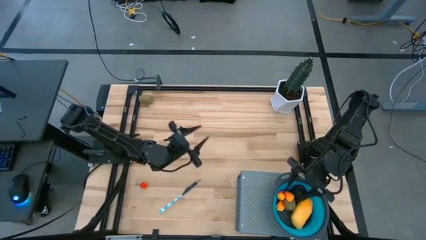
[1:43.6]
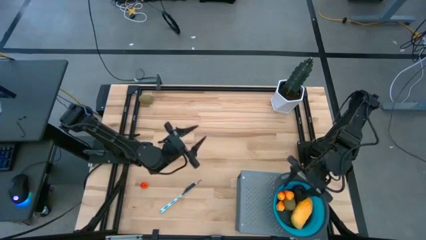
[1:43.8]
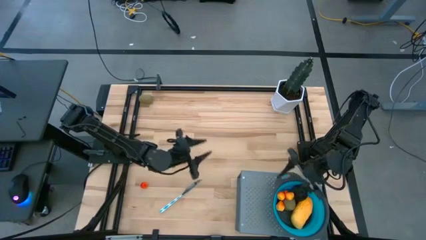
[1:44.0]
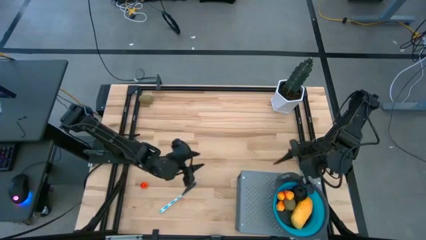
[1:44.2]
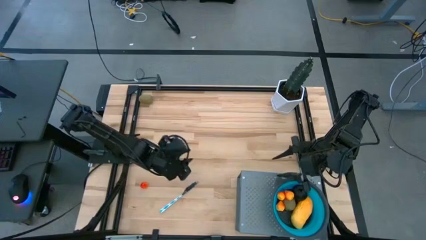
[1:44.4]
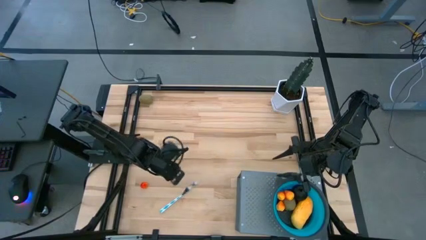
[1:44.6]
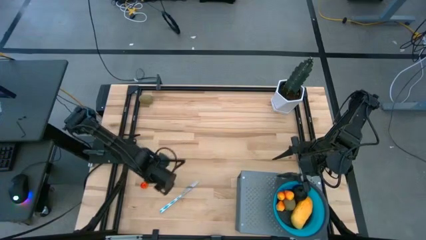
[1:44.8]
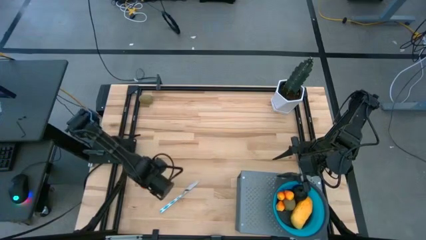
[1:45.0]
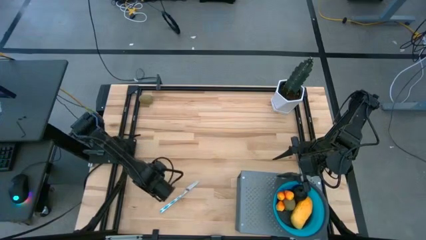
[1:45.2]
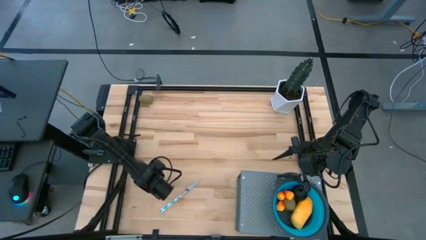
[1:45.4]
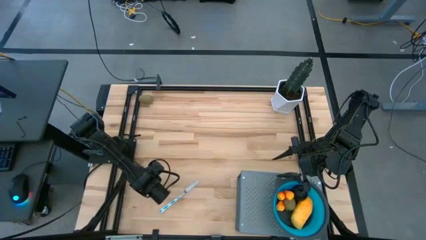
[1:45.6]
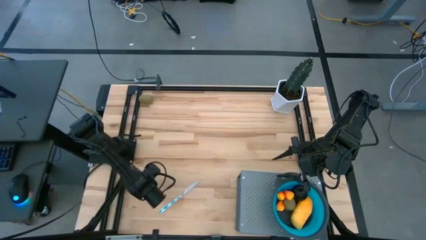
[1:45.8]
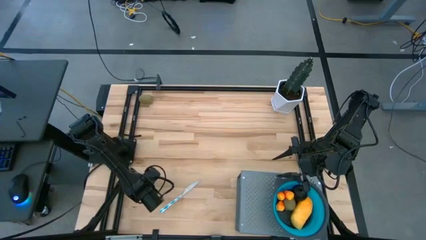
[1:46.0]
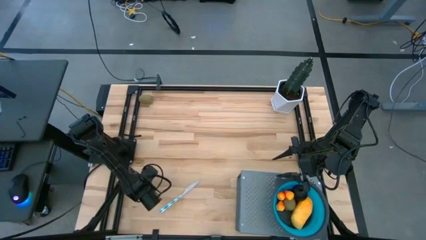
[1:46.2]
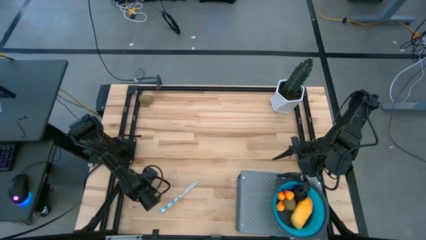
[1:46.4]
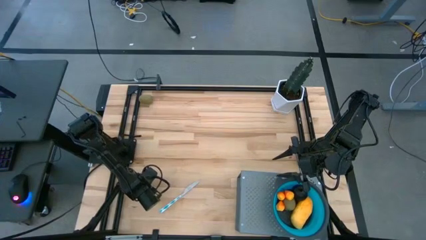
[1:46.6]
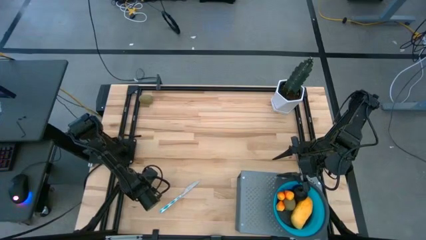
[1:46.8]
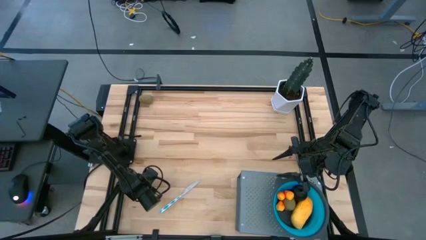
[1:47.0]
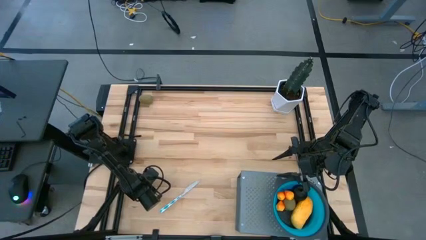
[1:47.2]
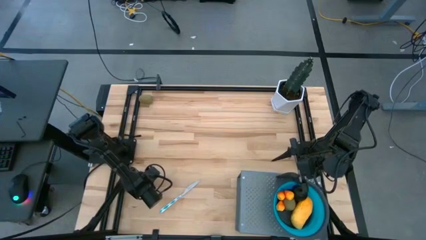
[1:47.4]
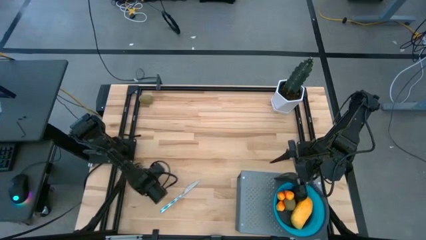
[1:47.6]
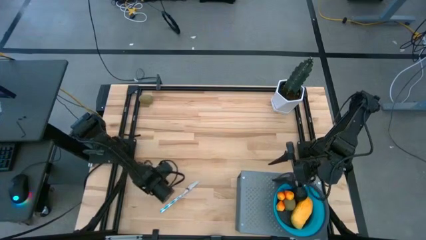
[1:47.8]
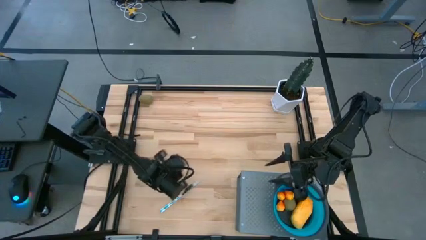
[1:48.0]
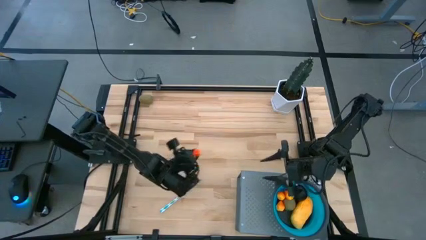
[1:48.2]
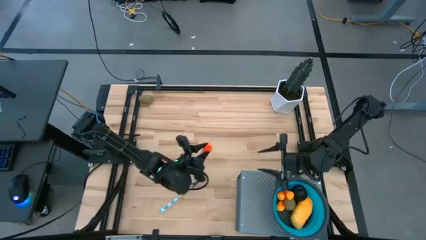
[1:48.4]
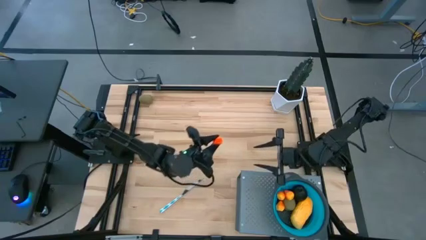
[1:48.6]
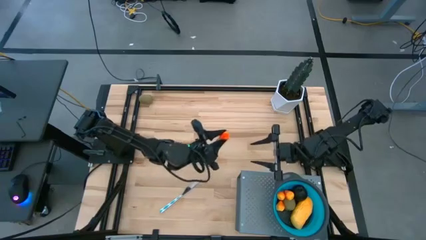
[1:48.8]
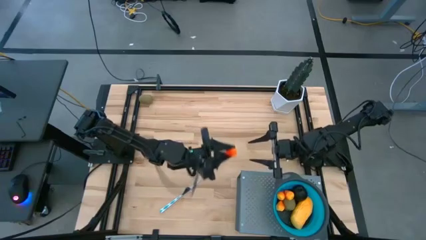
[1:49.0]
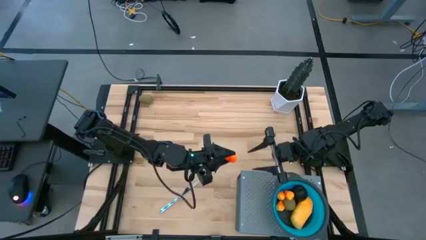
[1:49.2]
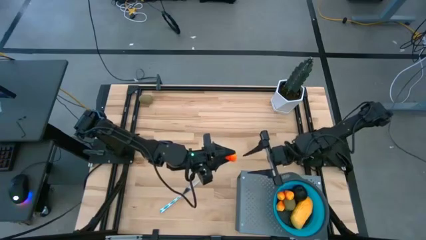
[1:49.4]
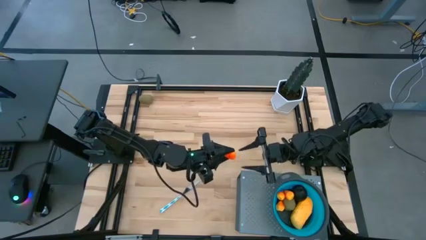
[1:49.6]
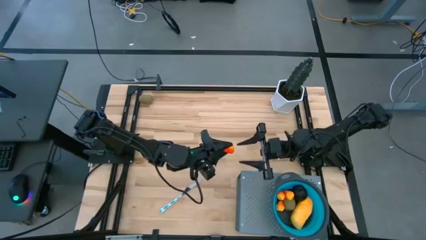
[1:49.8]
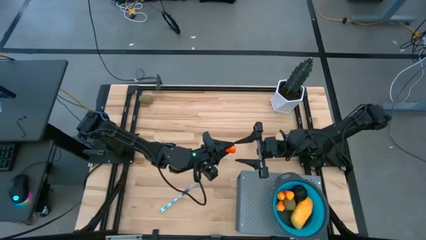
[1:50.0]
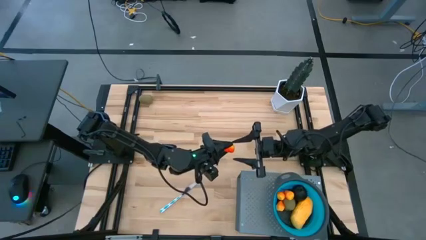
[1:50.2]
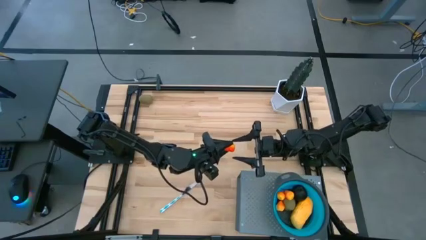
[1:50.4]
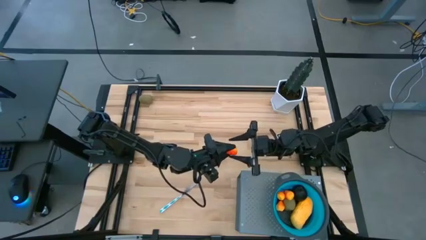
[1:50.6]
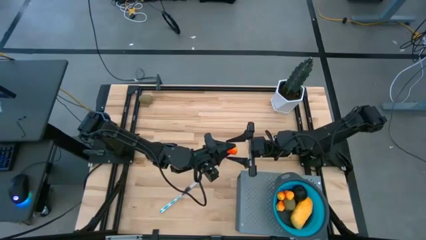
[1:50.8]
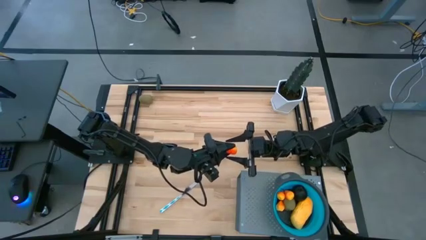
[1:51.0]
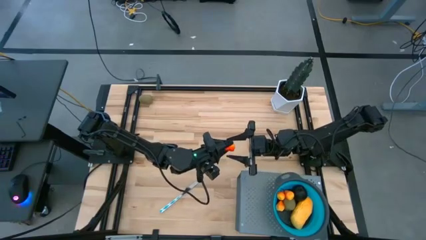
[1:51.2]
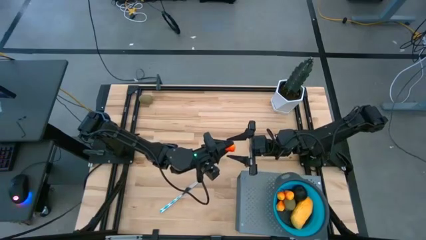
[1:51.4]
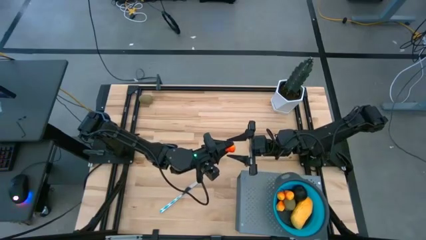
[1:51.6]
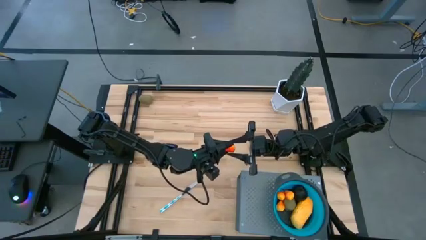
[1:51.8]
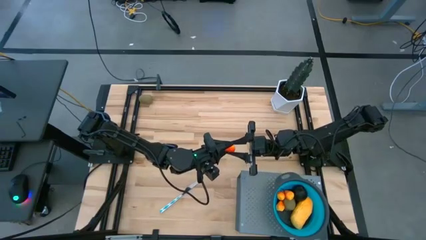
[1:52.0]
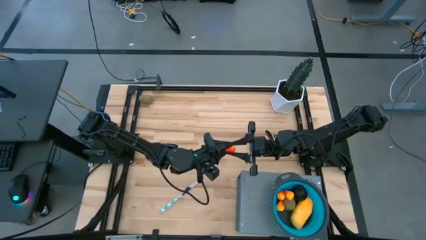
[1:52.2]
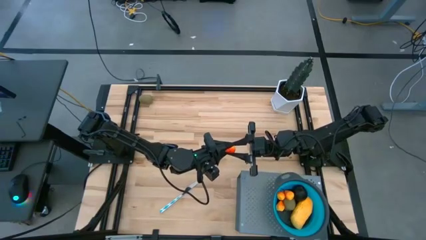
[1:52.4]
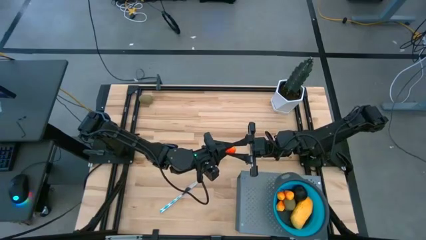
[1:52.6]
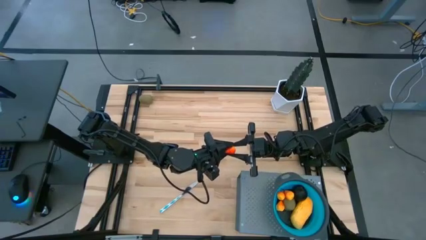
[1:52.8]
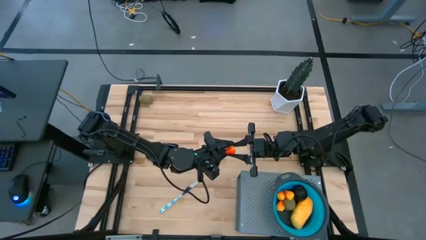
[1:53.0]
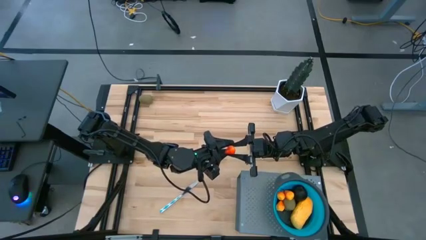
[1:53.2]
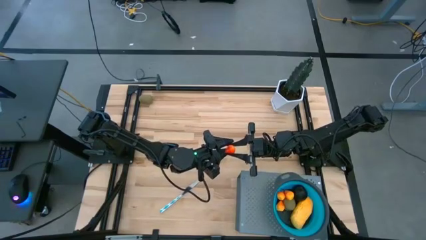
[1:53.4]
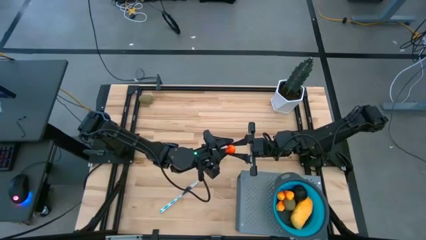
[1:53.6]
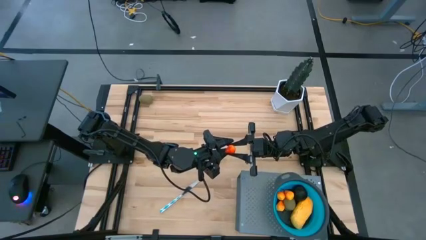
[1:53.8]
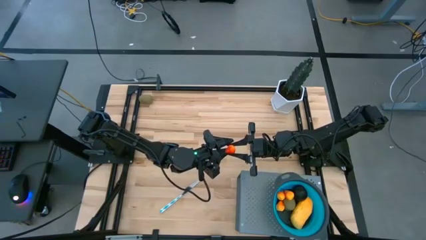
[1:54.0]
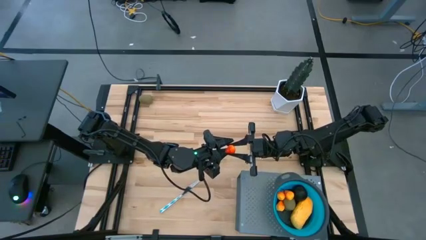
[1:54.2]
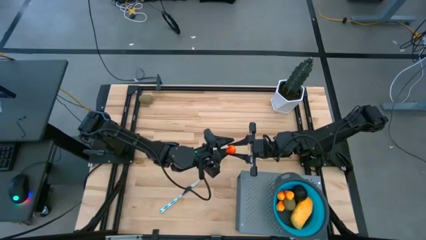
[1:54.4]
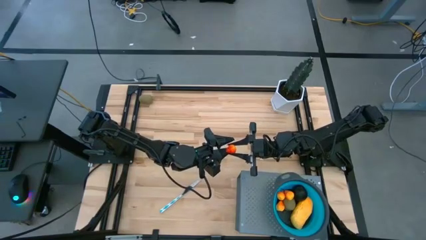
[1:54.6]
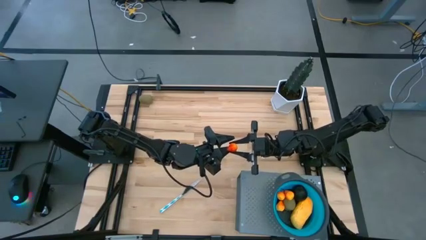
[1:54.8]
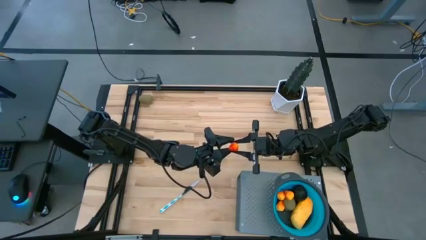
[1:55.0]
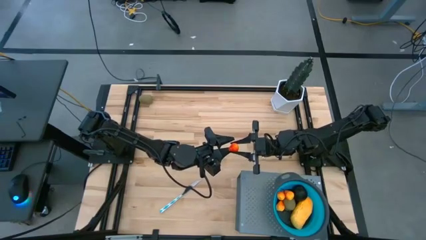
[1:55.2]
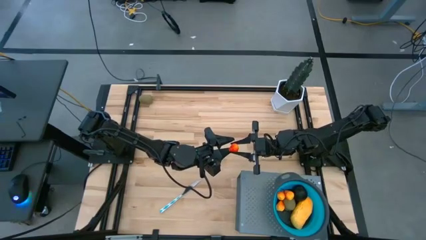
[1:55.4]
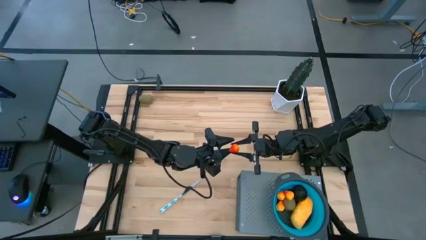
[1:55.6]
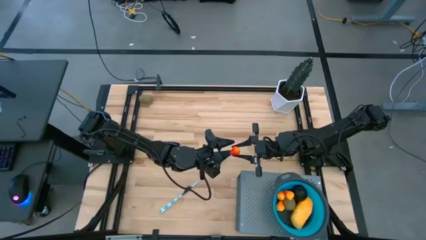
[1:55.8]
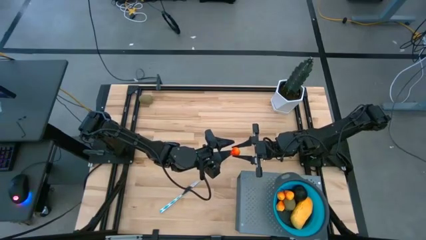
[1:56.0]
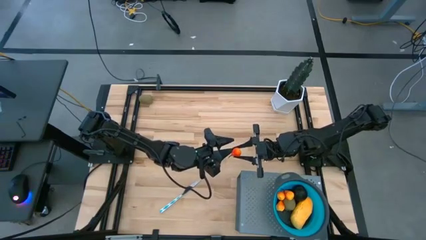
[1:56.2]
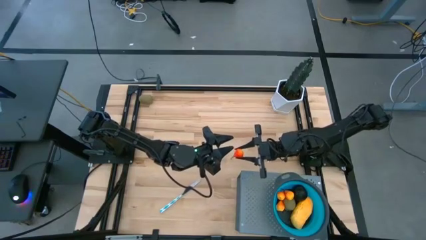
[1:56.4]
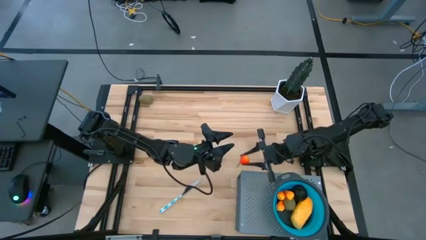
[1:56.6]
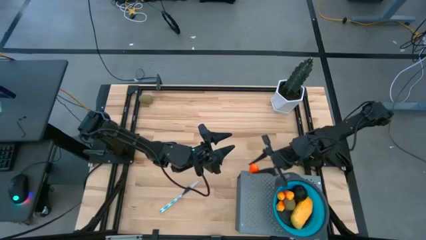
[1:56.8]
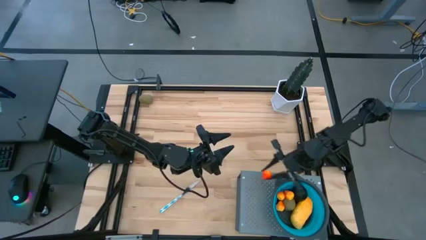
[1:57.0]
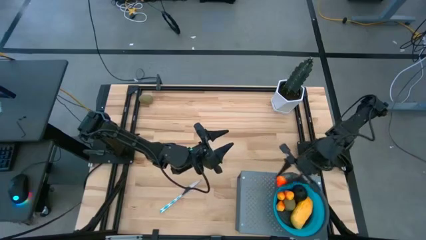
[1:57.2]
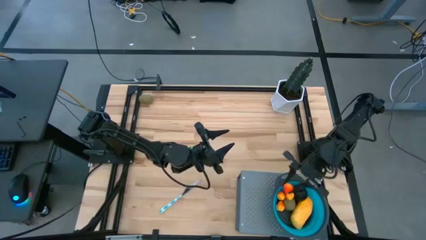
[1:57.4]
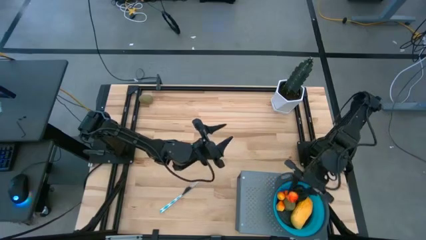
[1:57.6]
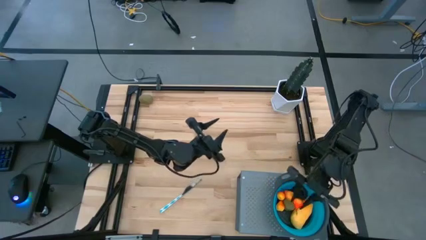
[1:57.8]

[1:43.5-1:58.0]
Task: Pick & Place Fruit
Put the yellow pear into the blue strainer bowl on the shelf

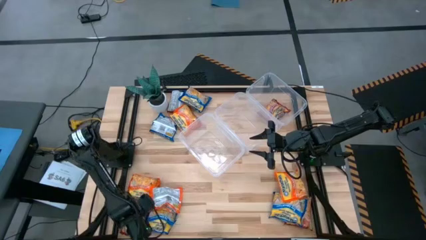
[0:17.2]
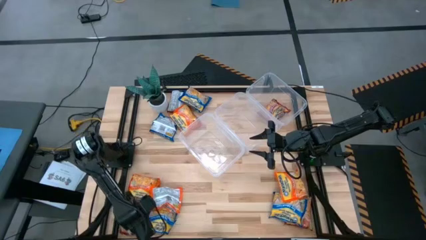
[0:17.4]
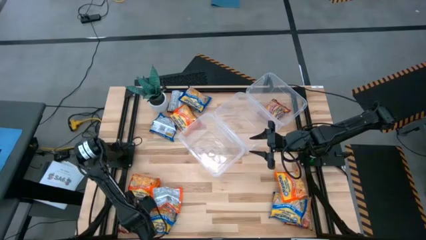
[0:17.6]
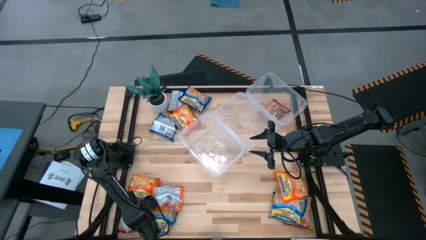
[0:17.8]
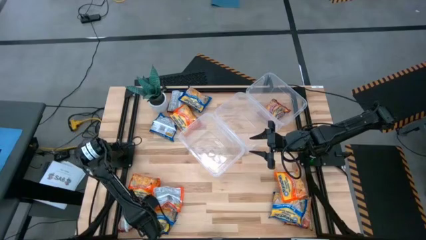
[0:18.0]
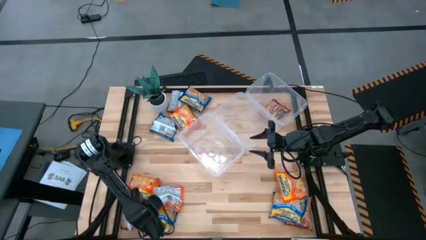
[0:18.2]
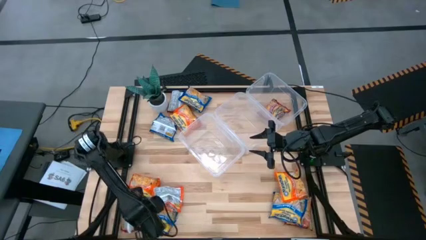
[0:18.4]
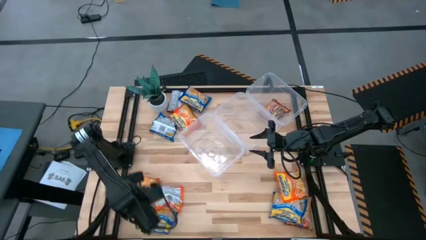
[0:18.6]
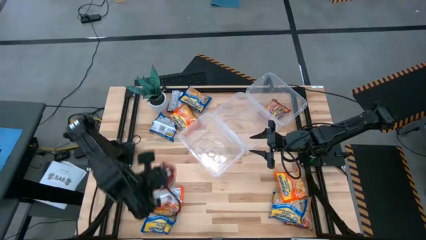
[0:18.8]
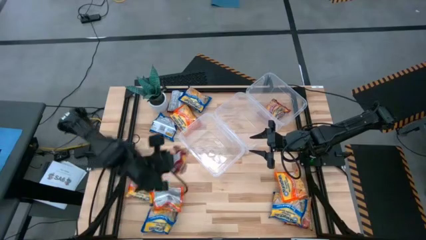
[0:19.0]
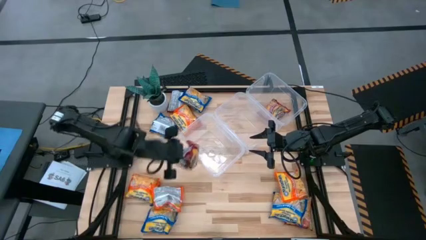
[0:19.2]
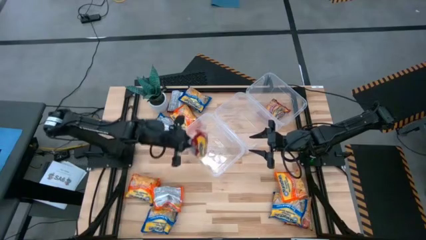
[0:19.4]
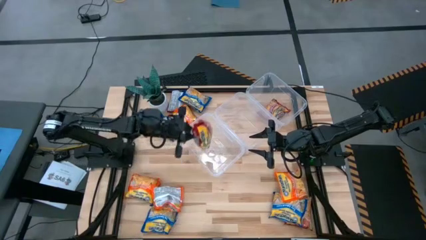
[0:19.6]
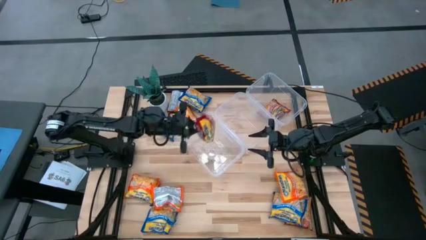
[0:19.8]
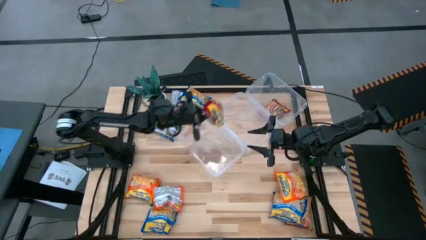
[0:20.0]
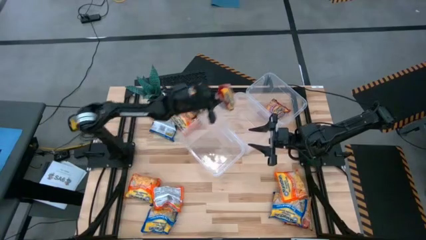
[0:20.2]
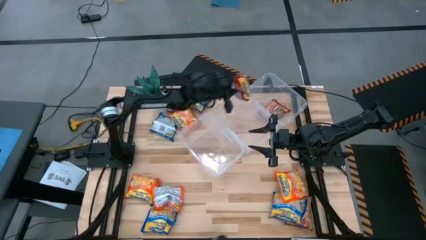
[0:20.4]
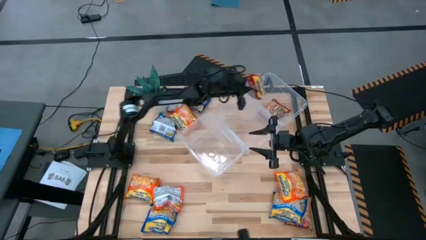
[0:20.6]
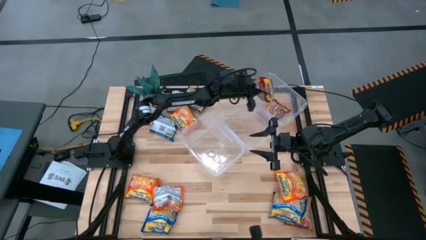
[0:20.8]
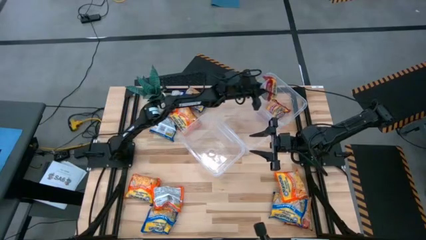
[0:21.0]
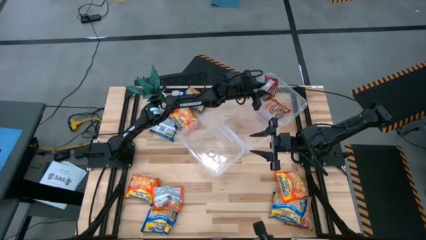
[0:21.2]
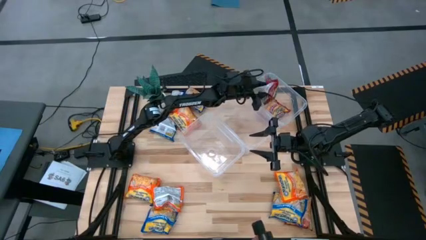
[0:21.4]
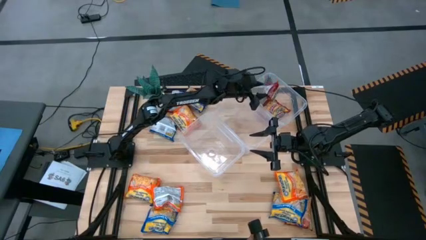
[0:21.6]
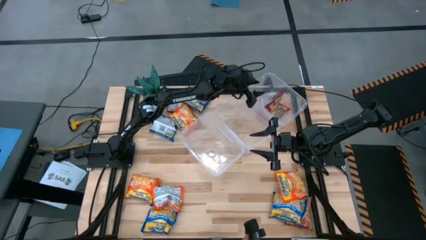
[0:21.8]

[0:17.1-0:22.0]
Task: Sort Maruchan noodles
Put the red noodle pack into the top right transparent bin
